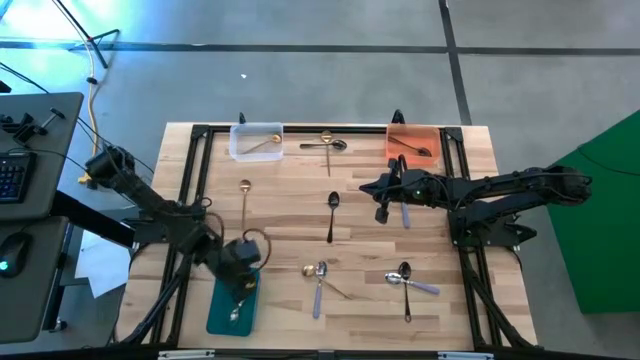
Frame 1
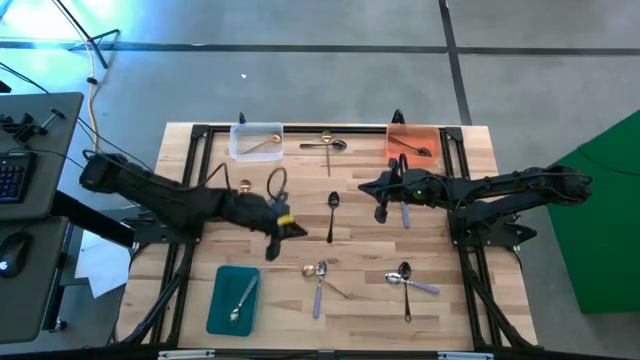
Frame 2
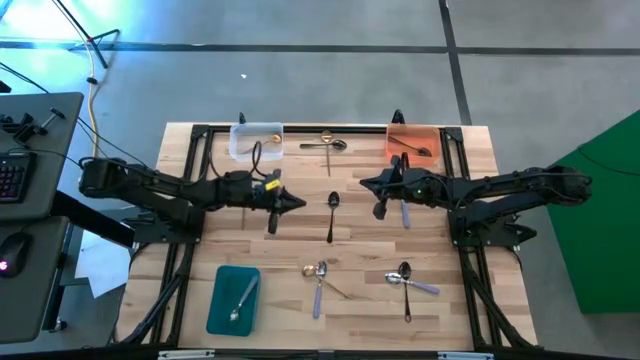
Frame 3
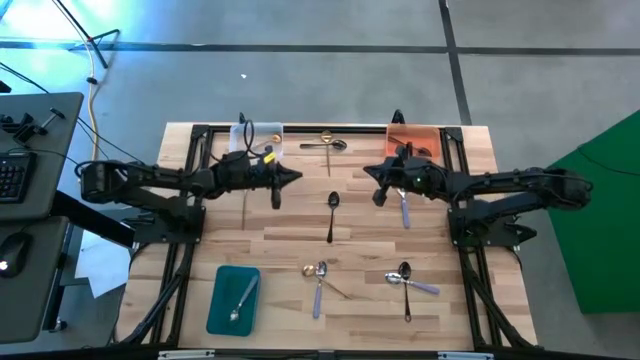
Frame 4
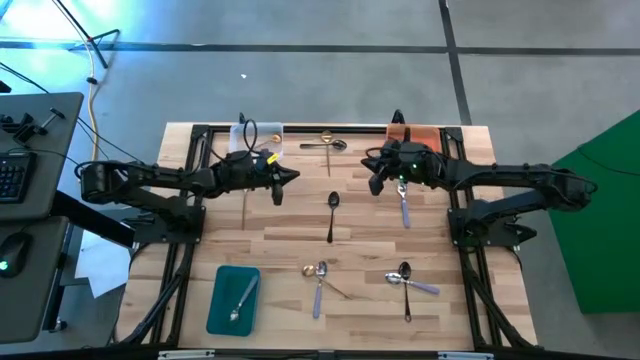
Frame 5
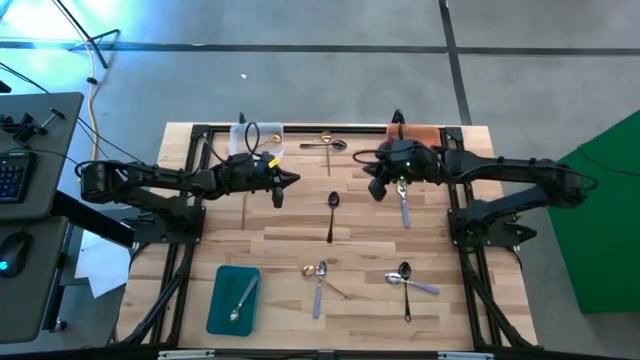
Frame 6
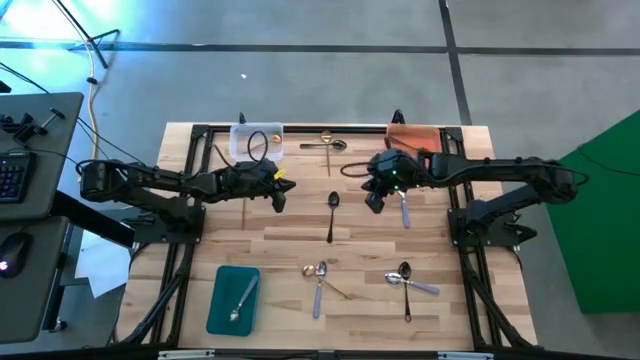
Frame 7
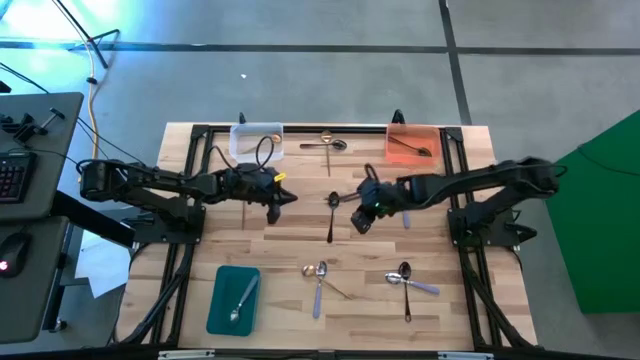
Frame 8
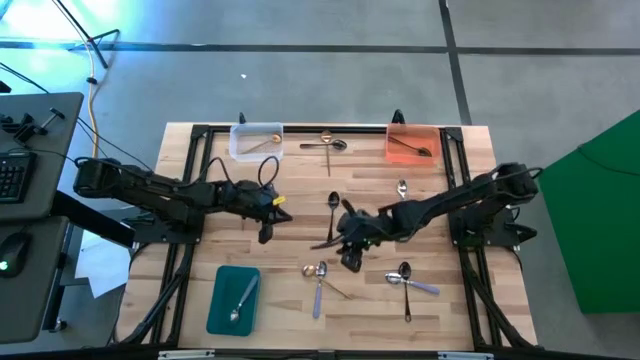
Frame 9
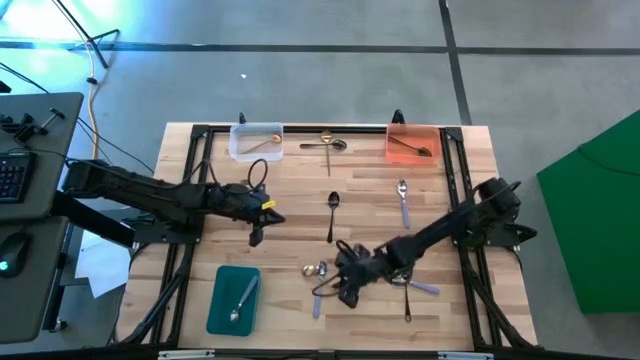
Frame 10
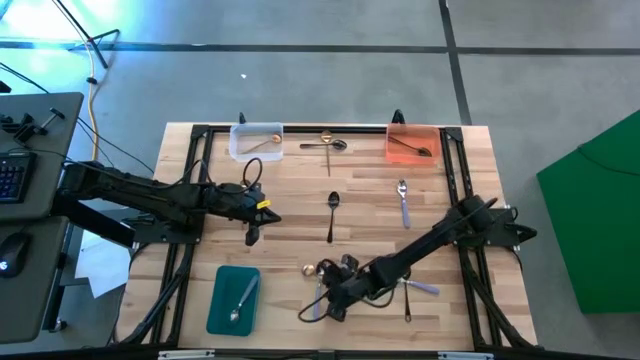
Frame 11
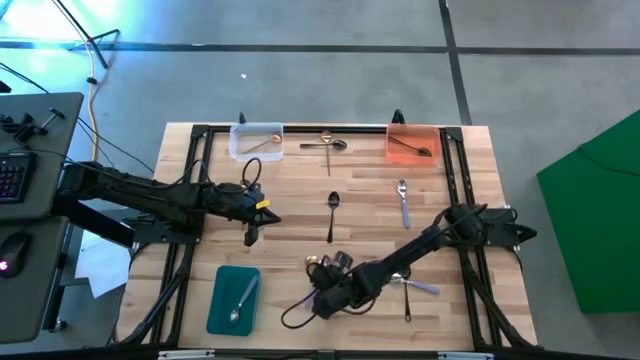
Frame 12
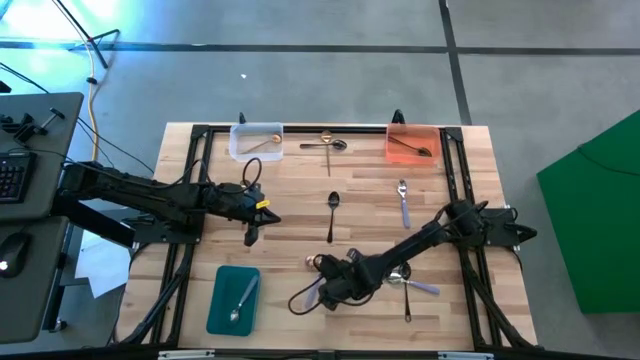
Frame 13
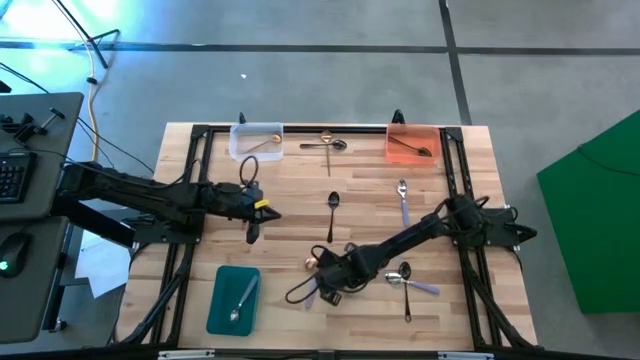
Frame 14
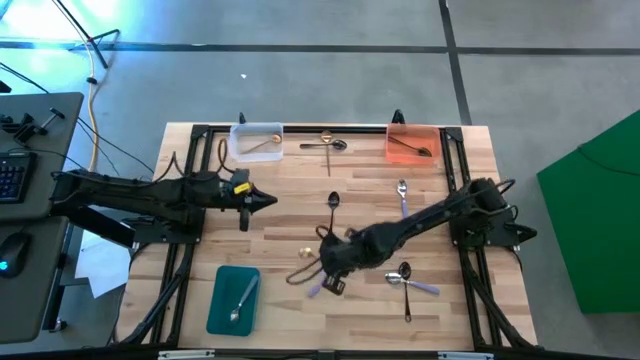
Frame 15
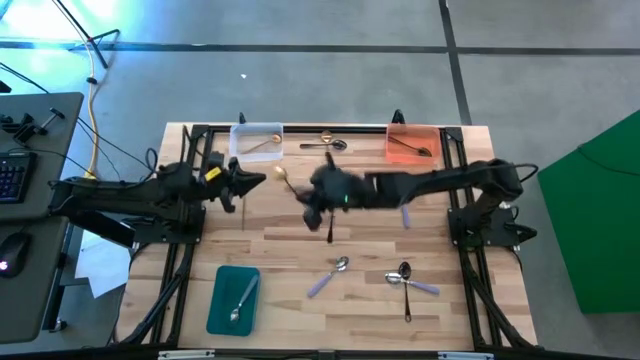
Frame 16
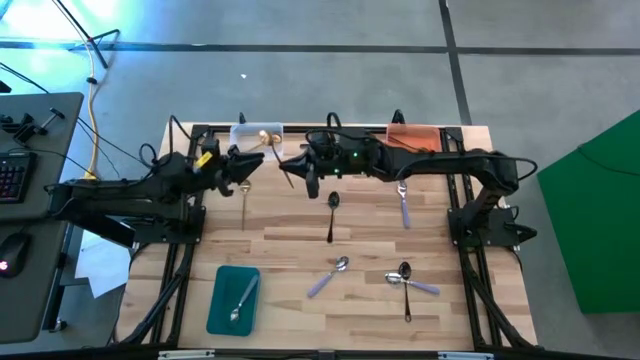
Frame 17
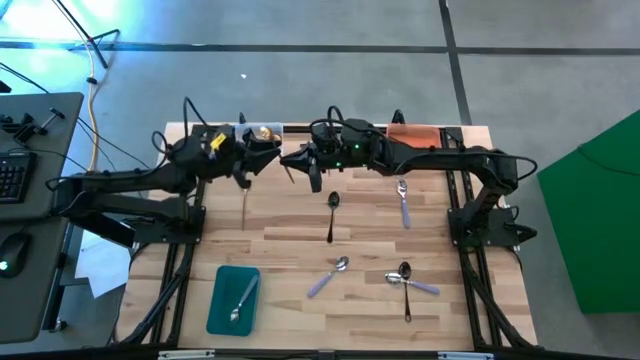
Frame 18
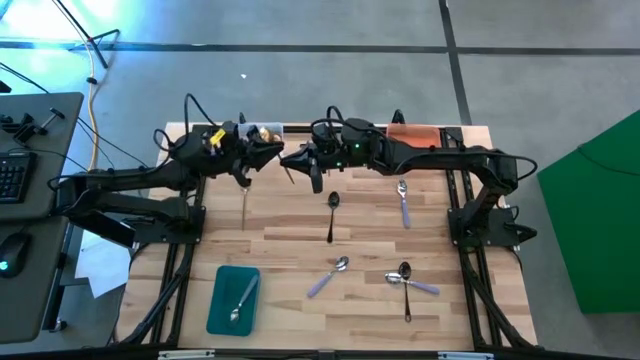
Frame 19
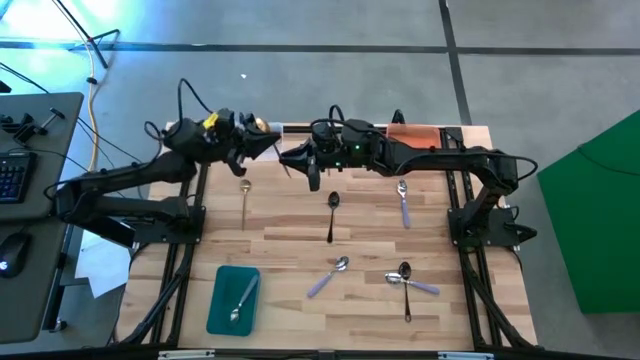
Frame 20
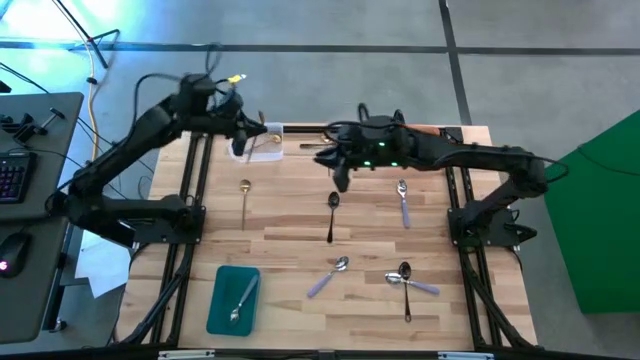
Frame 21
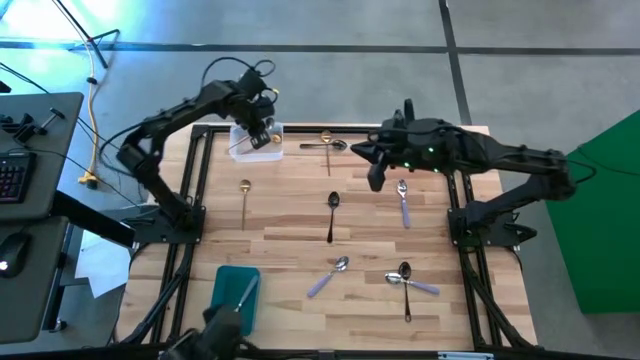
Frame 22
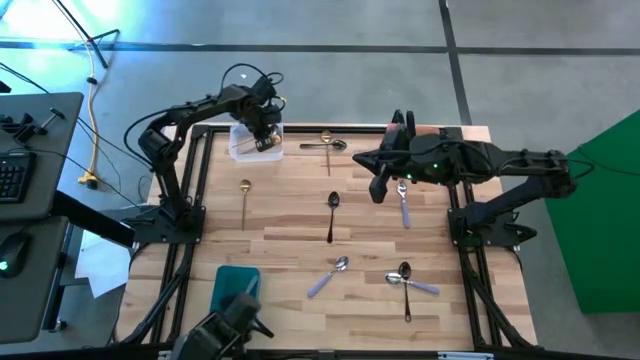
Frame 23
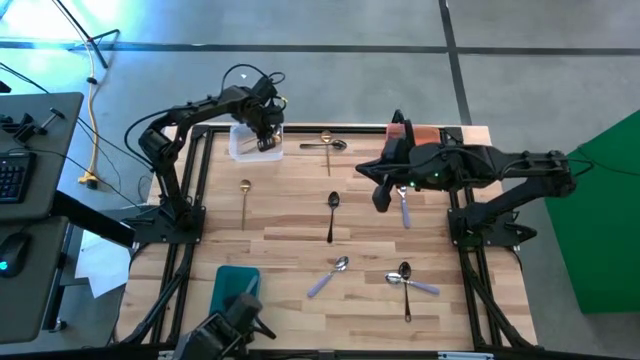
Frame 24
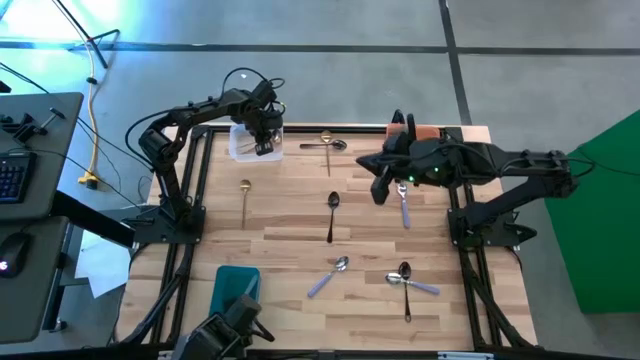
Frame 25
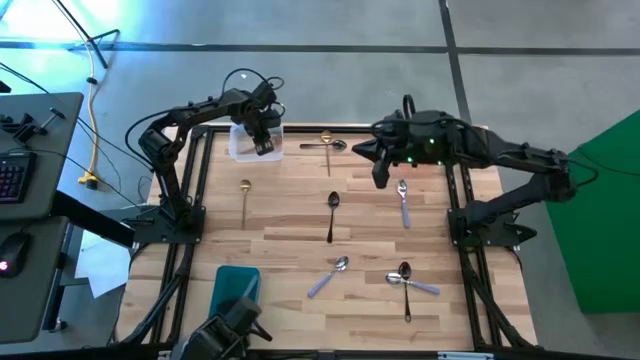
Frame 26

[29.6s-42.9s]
Task: Sort silverware by color (type)
Put the bottom gold spoon into the transparent bin

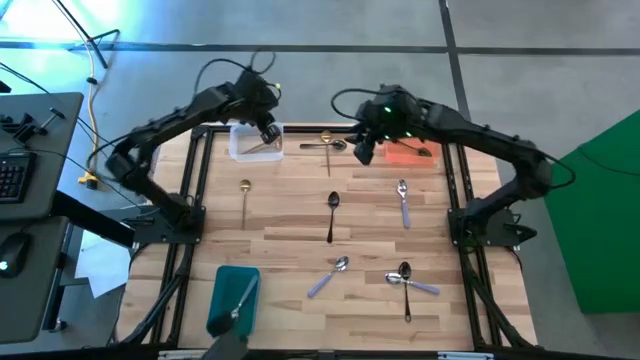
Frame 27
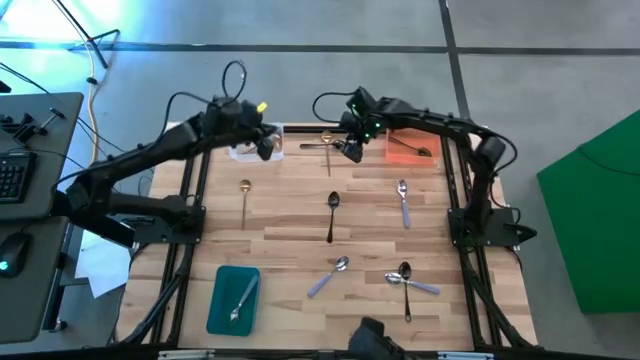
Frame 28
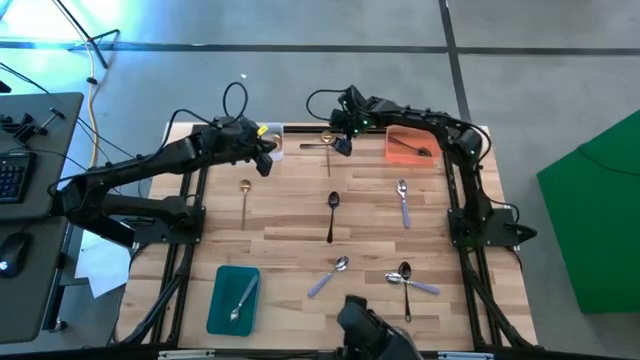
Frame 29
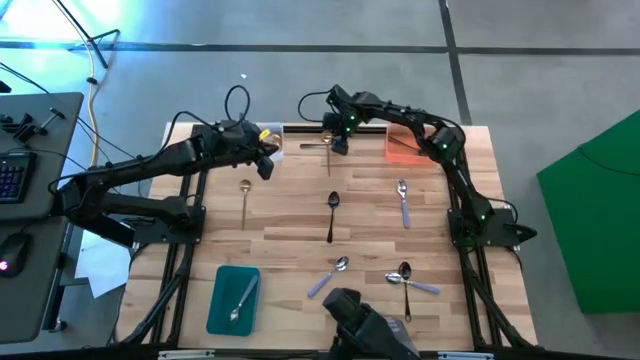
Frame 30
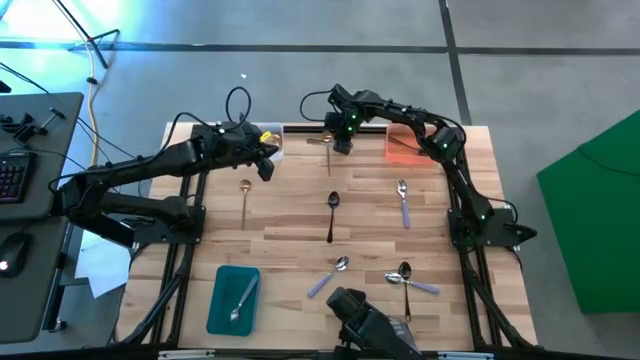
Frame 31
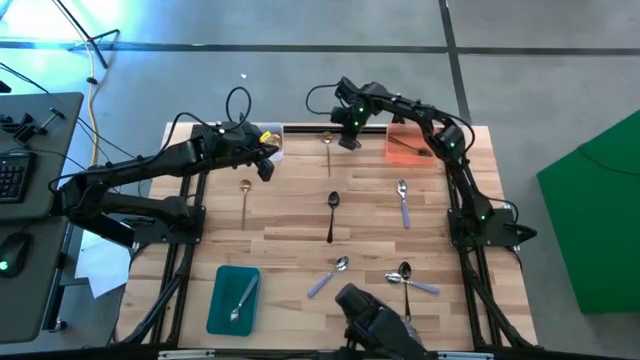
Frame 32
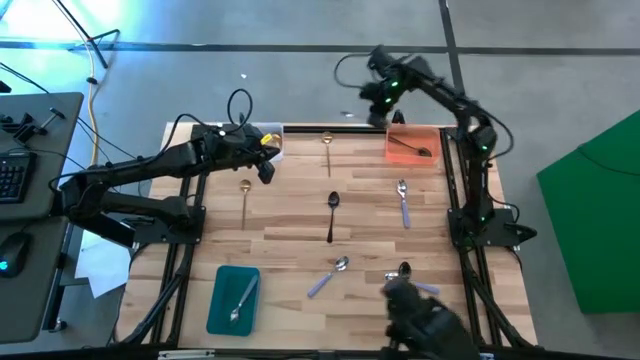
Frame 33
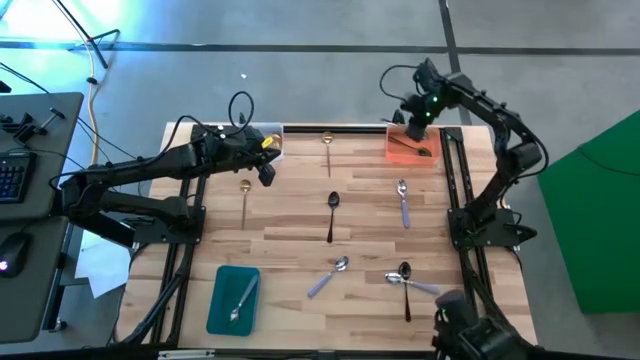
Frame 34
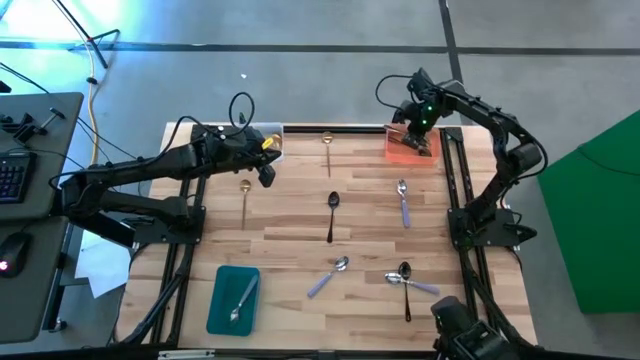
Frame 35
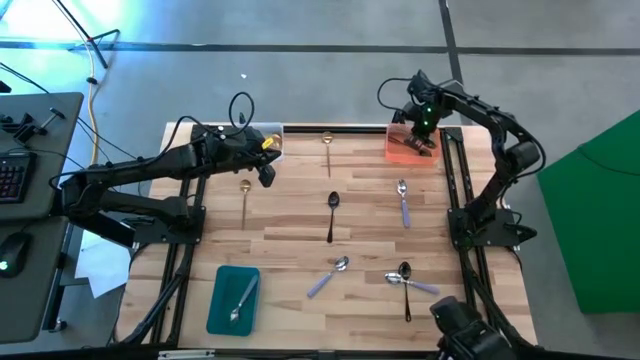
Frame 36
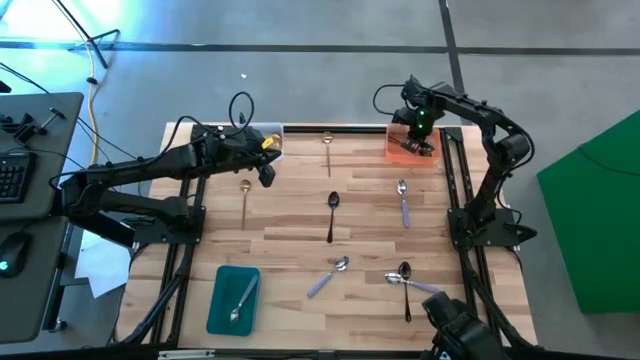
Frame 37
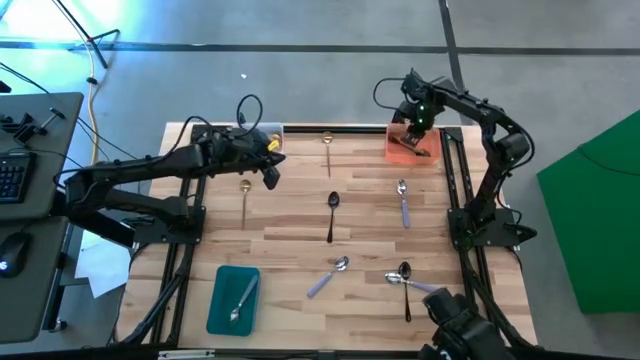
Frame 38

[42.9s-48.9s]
Put the top black spoon into the orange bin
